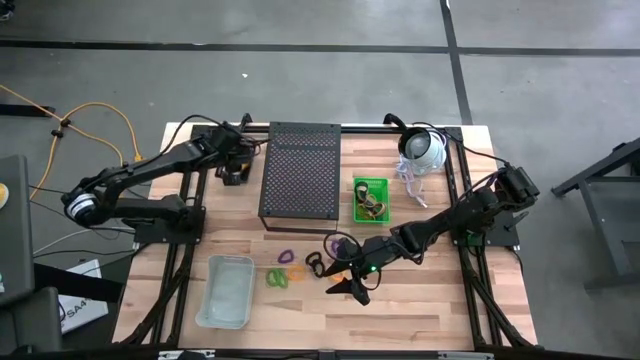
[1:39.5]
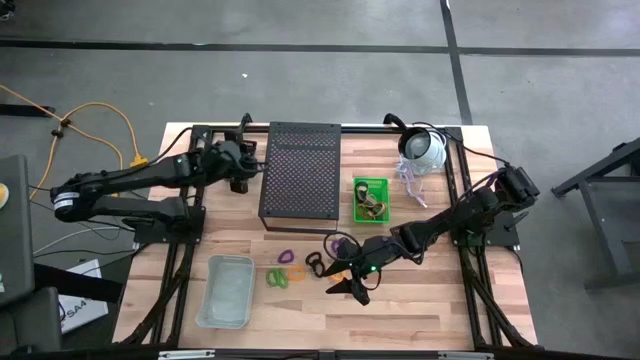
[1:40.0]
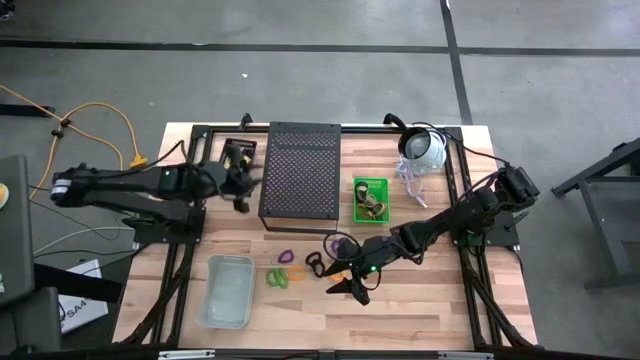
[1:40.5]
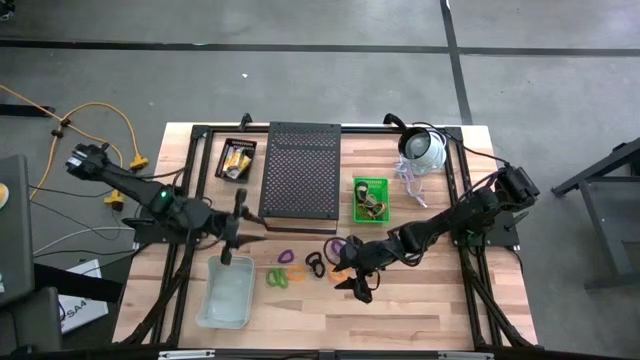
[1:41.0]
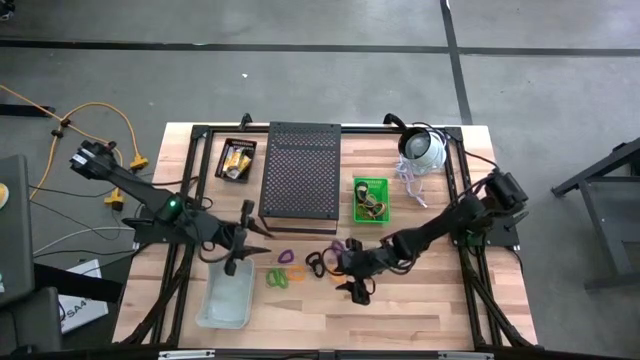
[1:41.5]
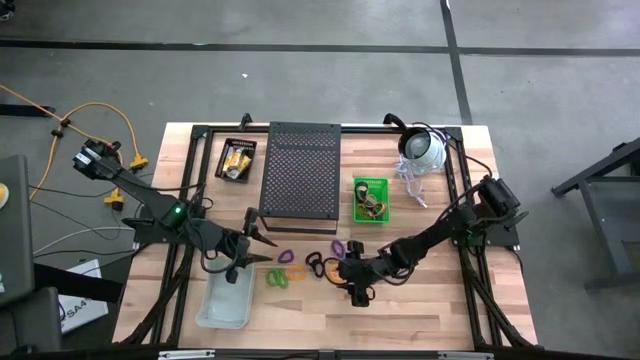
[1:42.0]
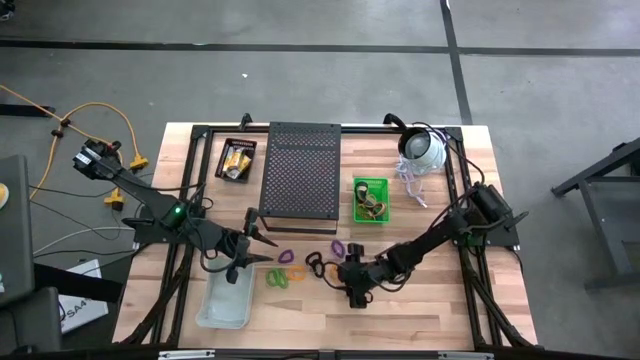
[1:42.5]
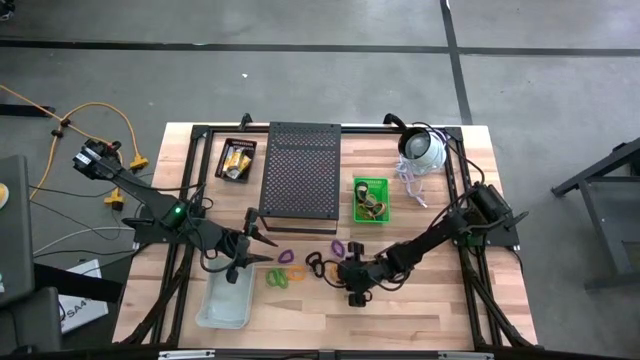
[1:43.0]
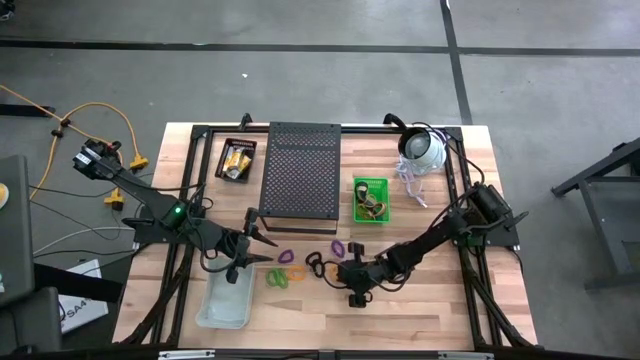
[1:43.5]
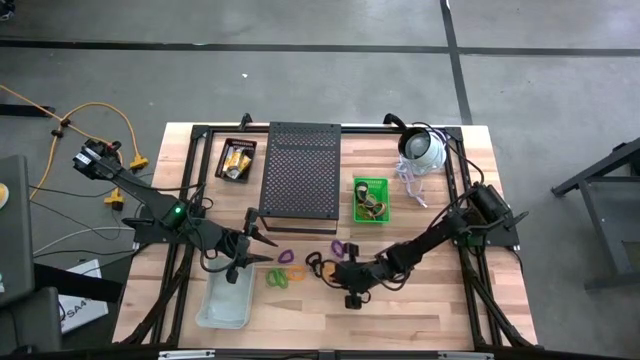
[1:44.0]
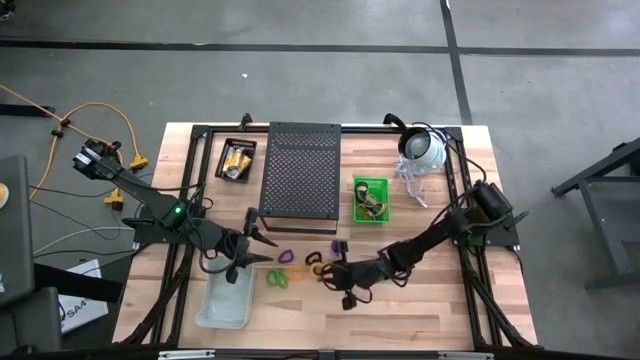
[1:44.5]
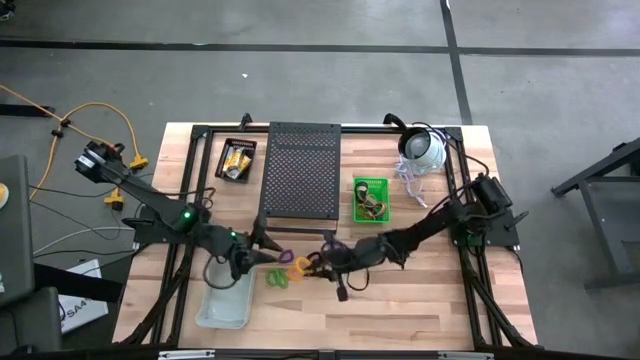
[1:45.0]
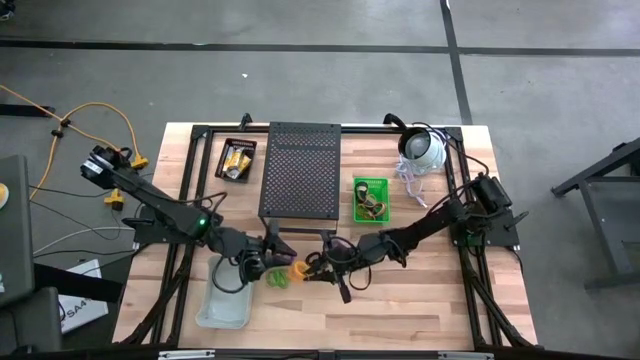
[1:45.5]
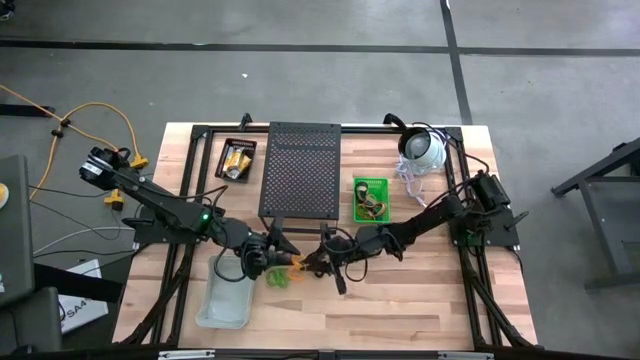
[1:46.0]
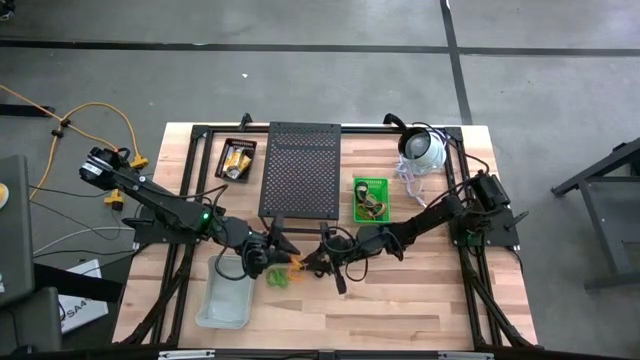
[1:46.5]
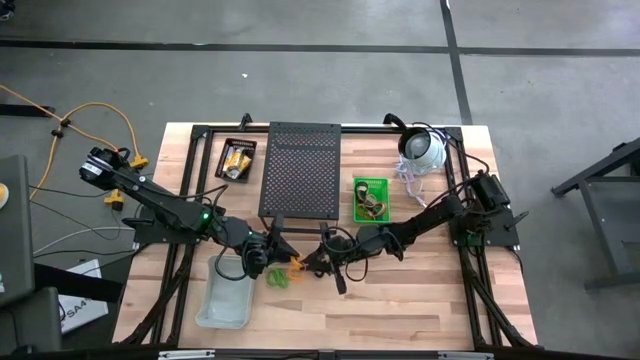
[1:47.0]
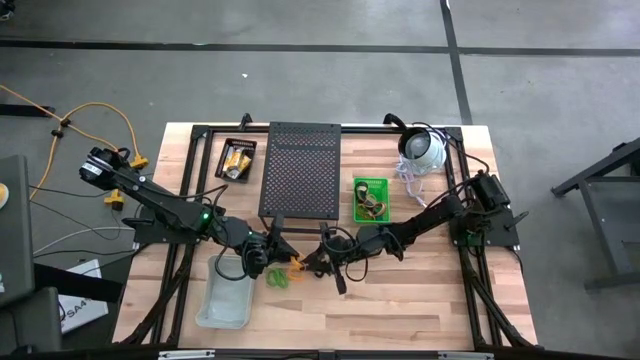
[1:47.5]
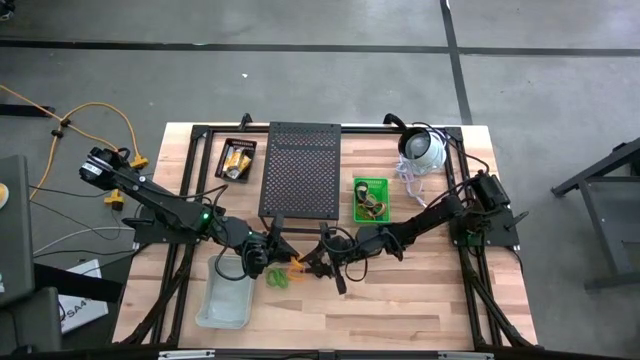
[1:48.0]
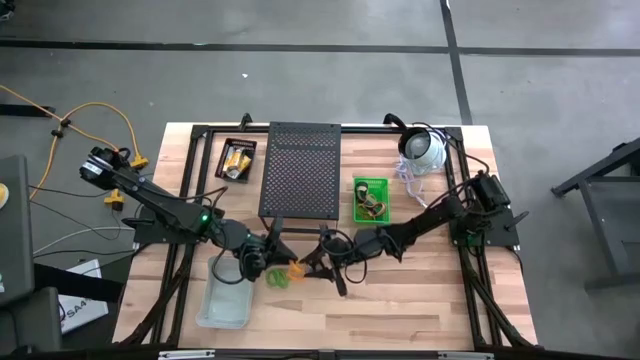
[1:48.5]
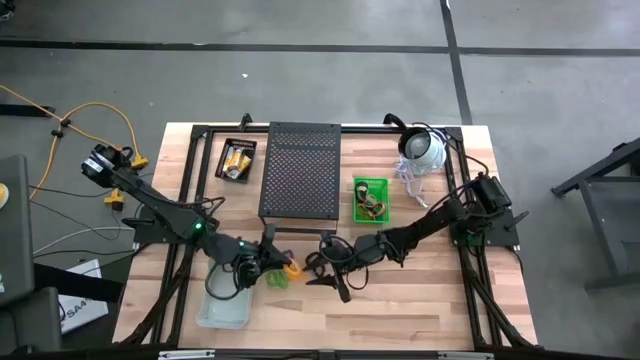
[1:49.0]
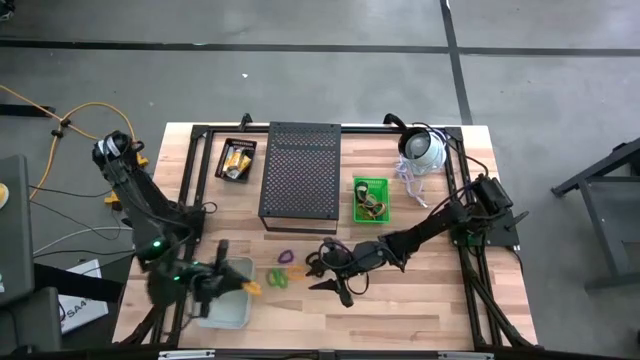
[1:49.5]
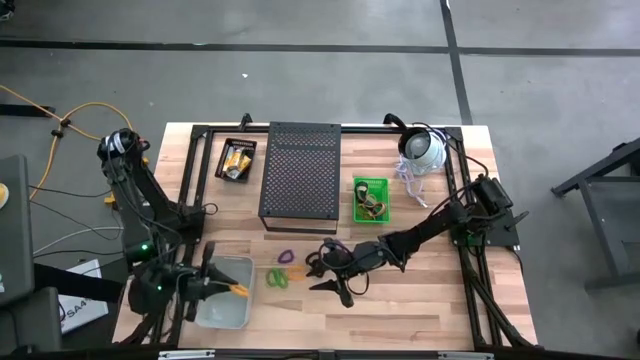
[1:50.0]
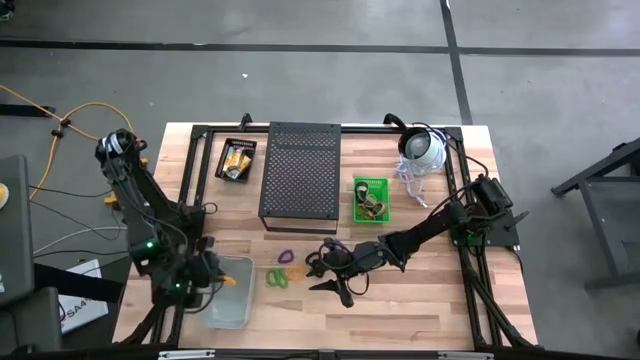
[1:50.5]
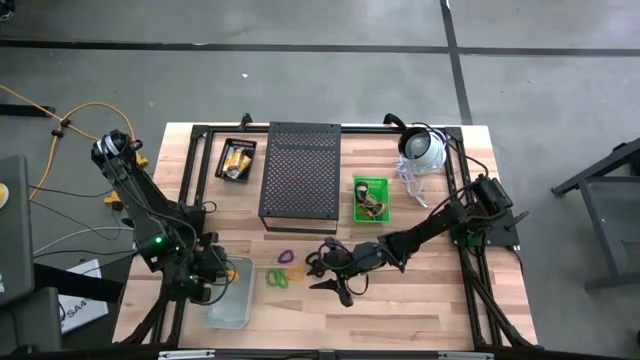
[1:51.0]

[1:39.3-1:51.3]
Task: Pick & Place Office Desk Supplies
Put the right yellow spring keychain into the gray bin

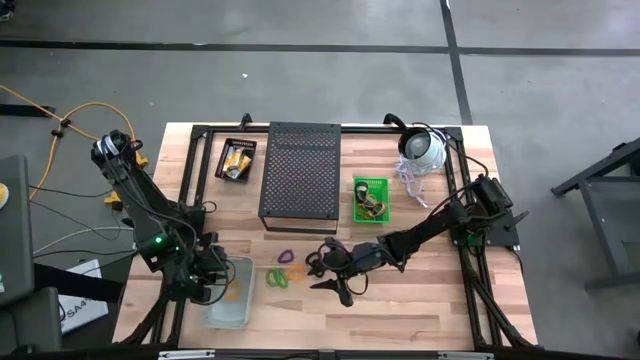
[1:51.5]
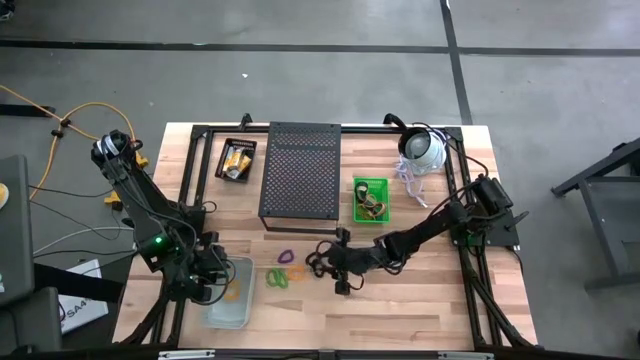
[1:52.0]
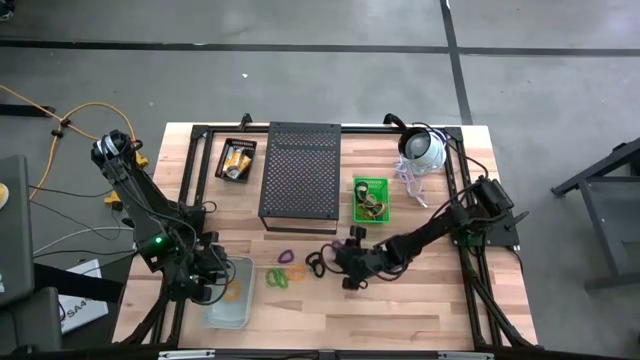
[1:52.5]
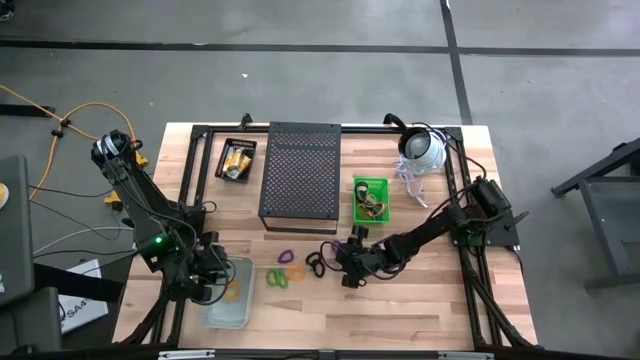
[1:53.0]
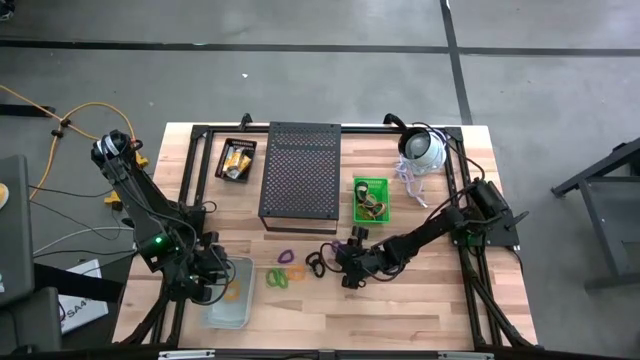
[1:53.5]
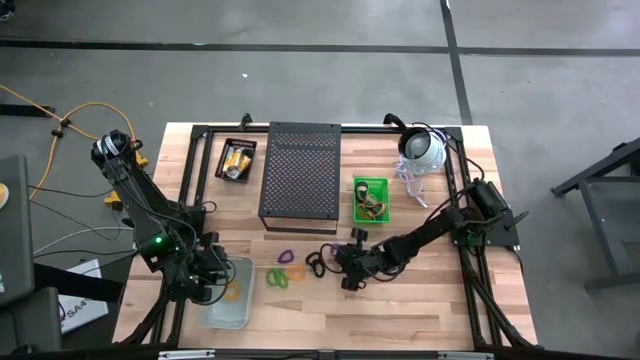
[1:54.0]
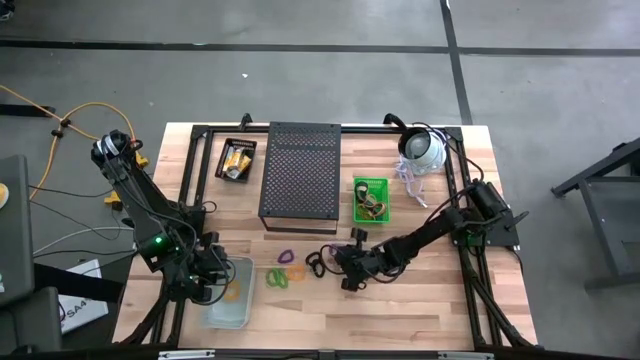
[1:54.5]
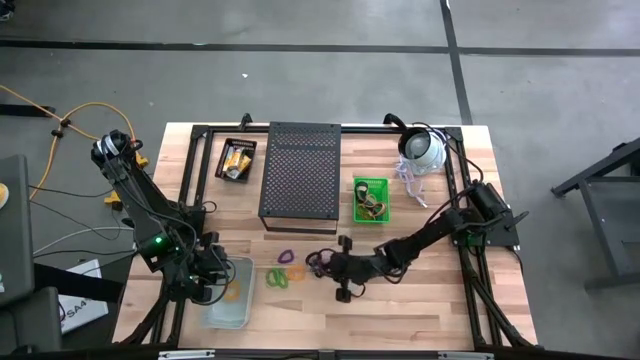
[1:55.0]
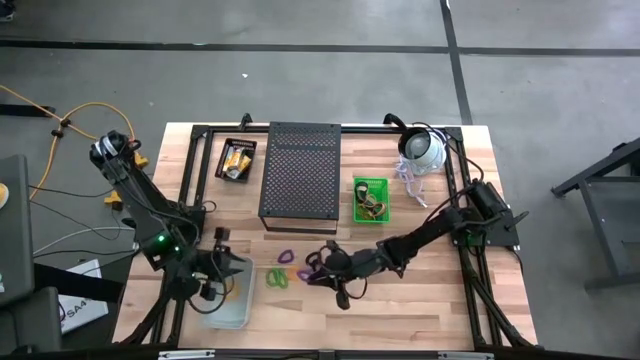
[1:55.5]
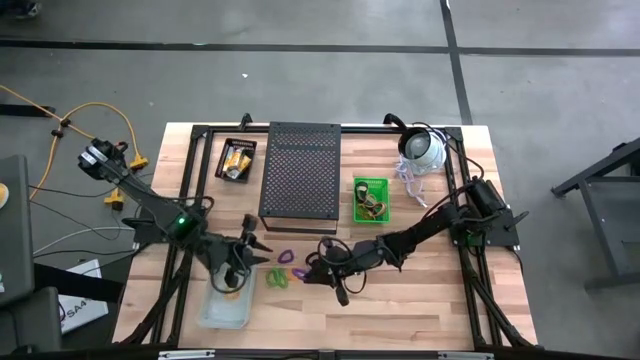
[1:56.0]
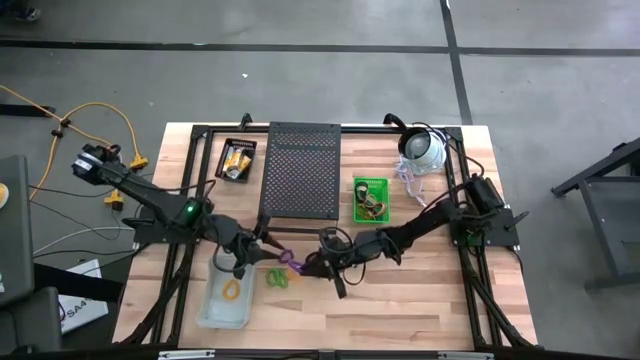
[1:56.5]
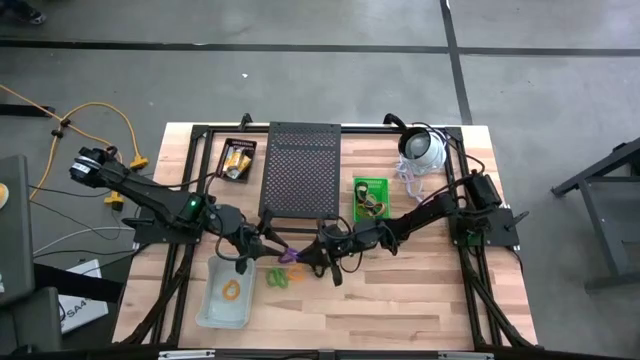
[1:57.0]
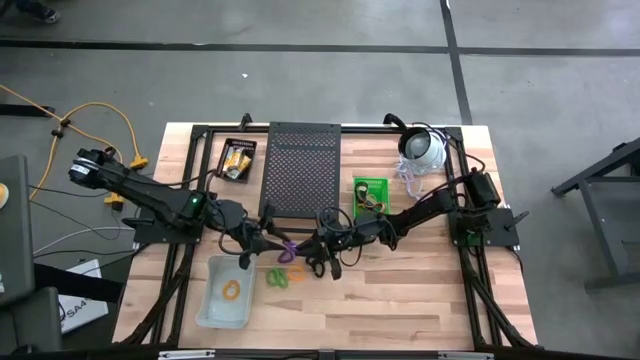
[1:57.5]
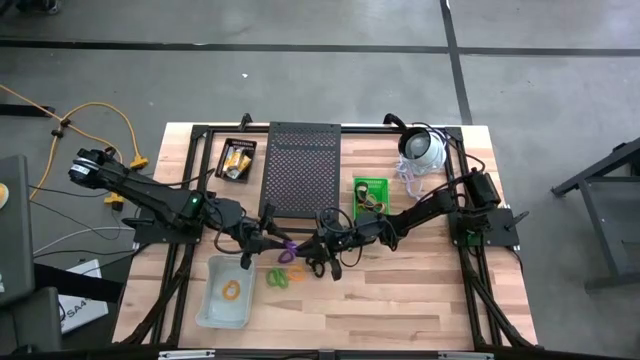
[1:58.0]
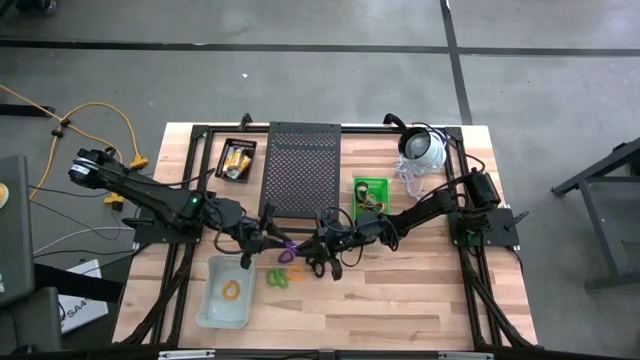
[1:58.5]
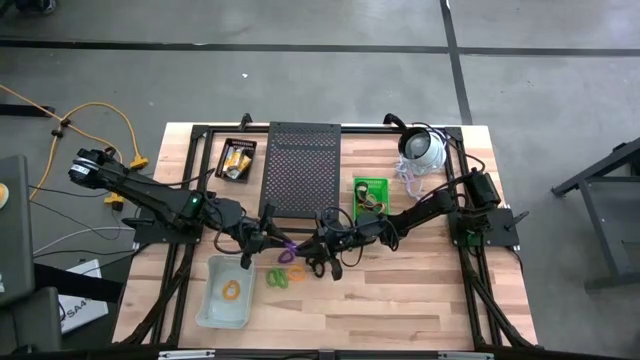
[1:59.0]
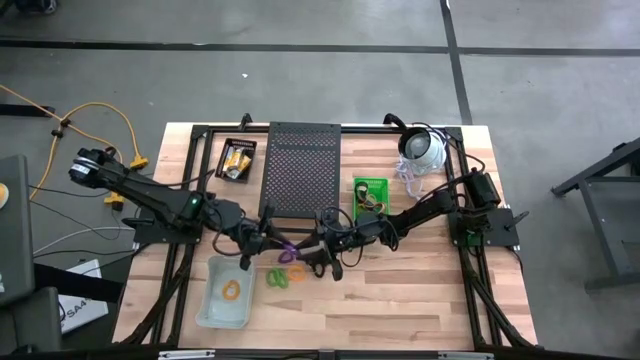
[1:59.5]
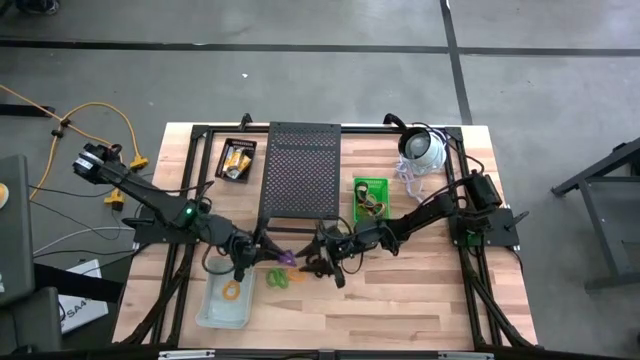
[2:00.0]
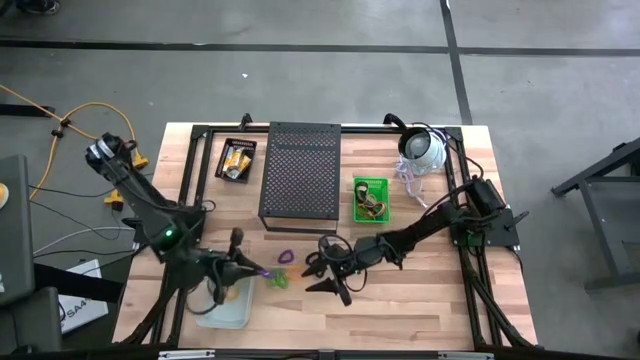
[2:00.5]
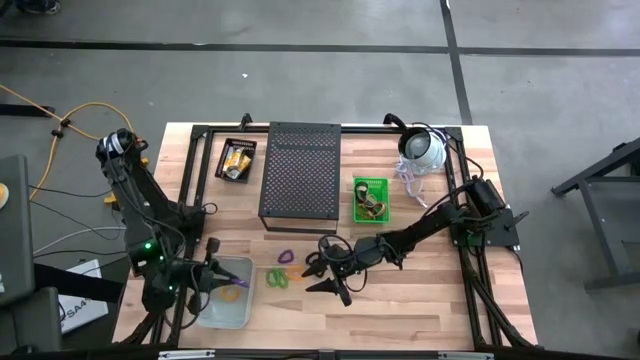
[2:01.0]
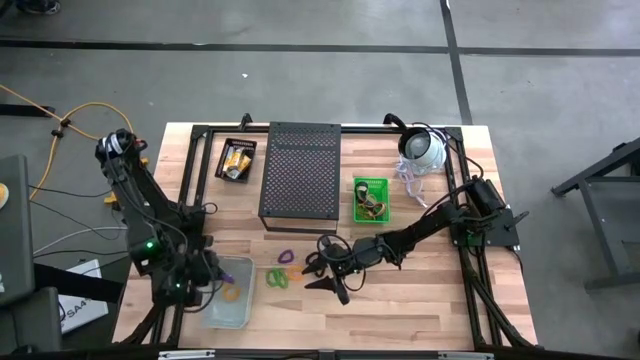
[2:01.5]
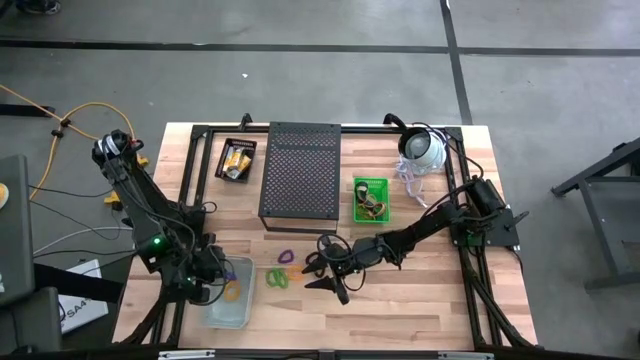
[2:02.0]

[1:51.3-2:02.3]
Put the right purple spring keychain into the gray bin
